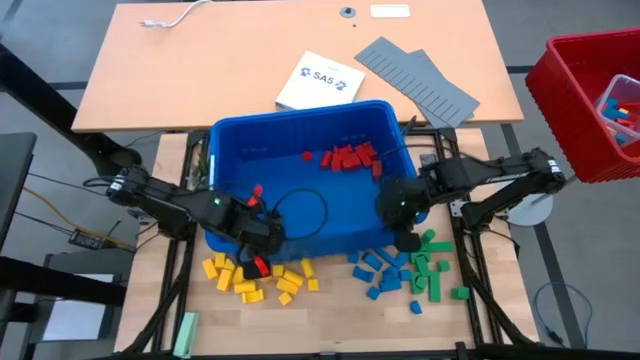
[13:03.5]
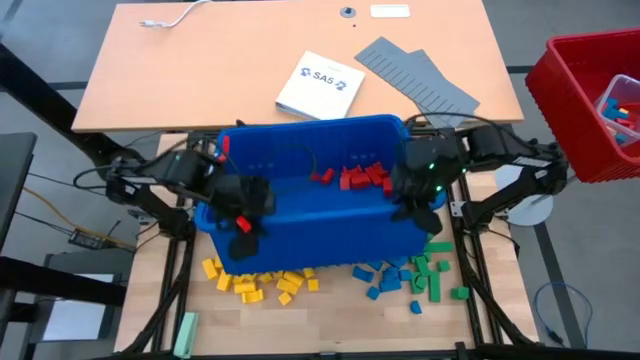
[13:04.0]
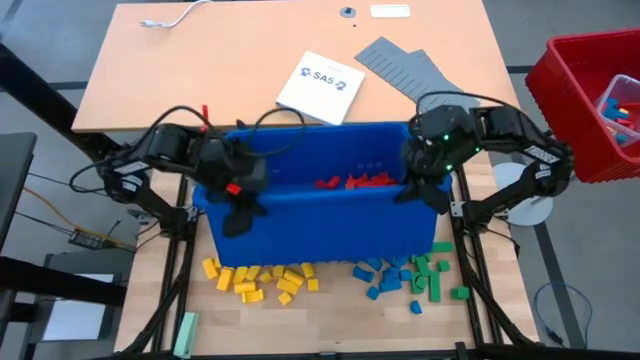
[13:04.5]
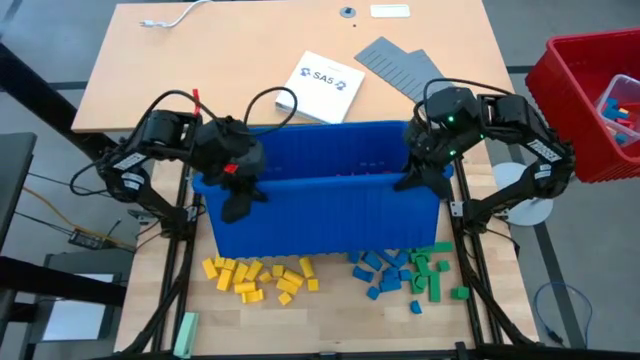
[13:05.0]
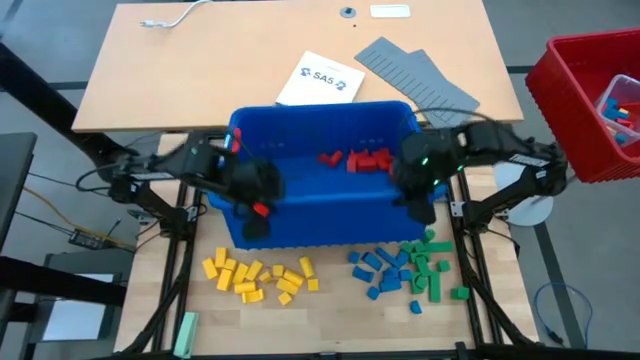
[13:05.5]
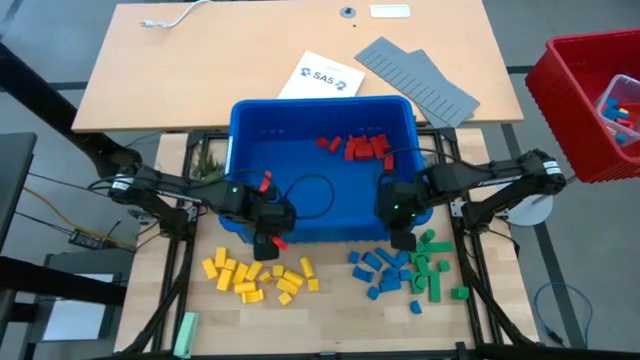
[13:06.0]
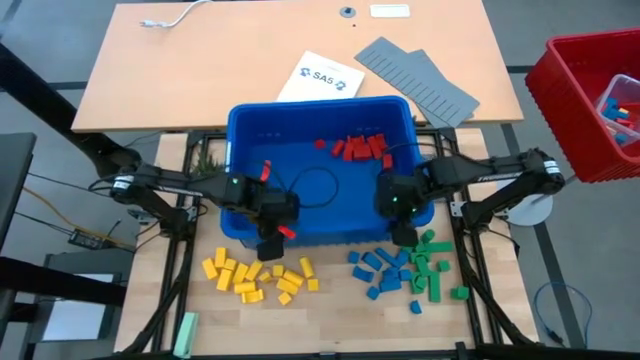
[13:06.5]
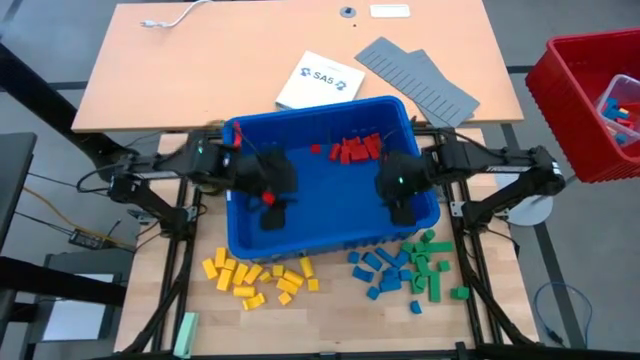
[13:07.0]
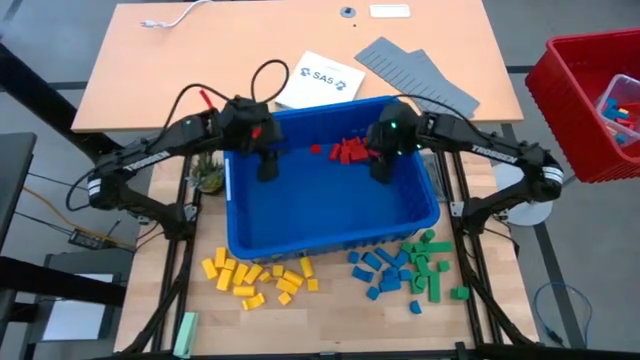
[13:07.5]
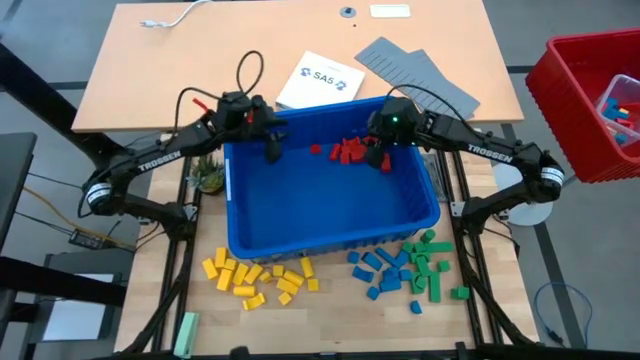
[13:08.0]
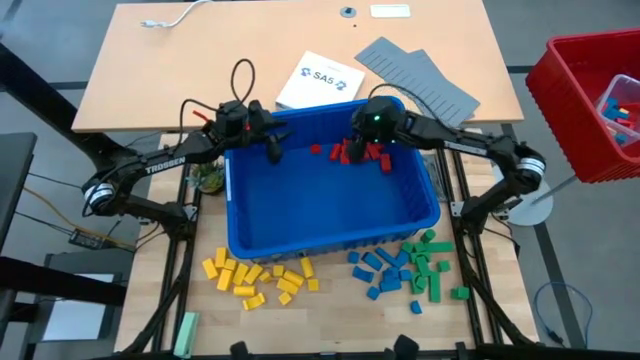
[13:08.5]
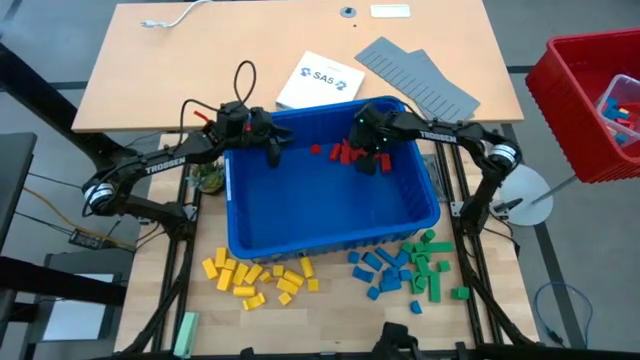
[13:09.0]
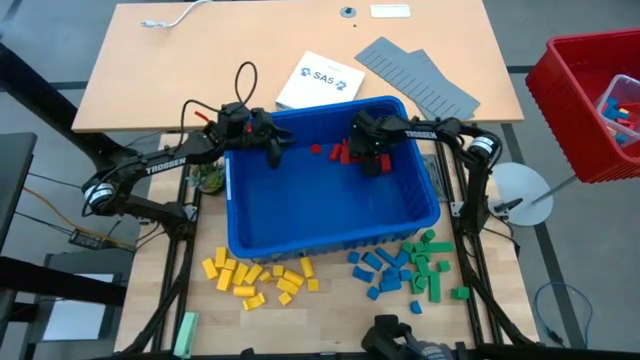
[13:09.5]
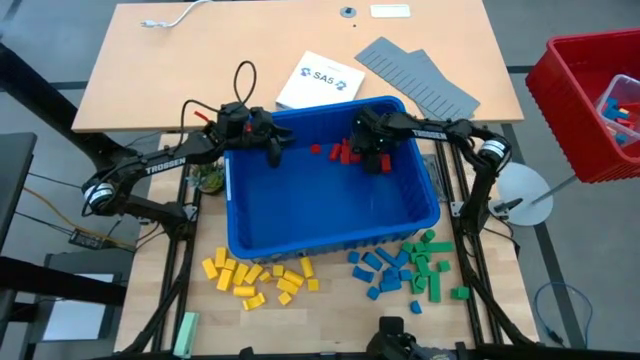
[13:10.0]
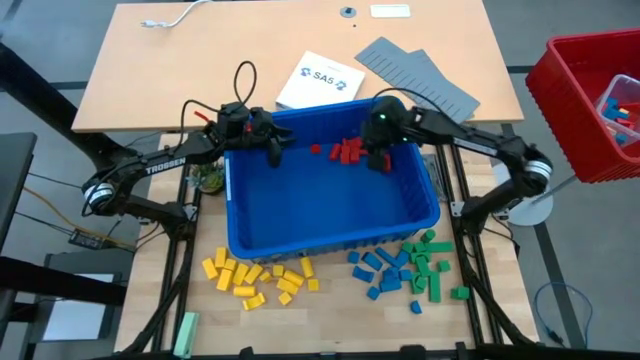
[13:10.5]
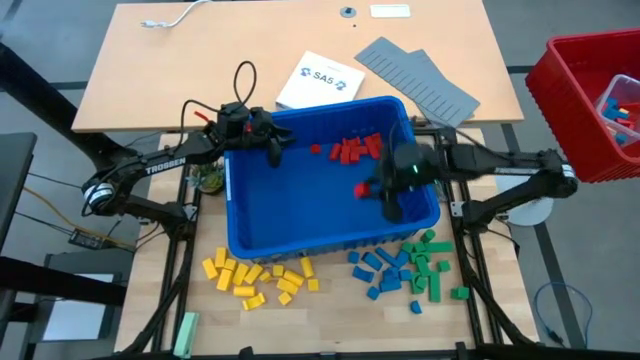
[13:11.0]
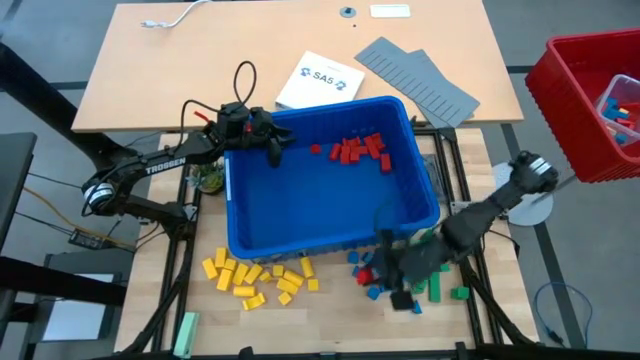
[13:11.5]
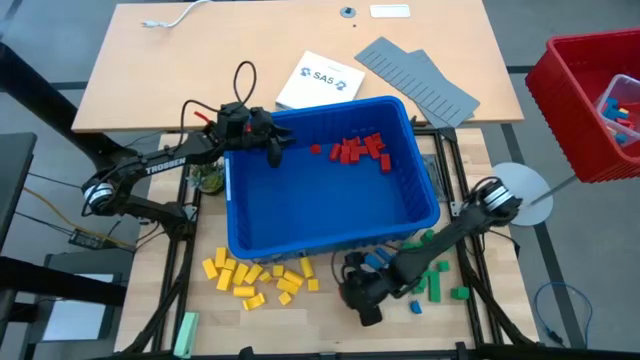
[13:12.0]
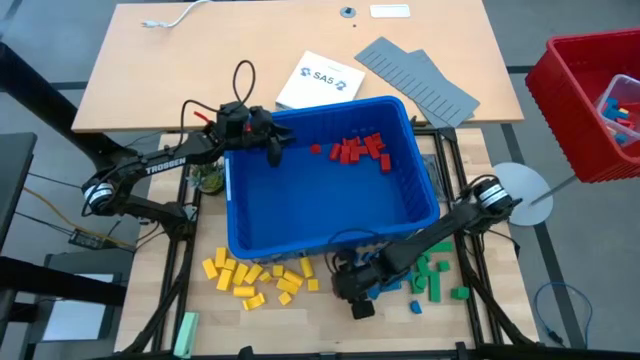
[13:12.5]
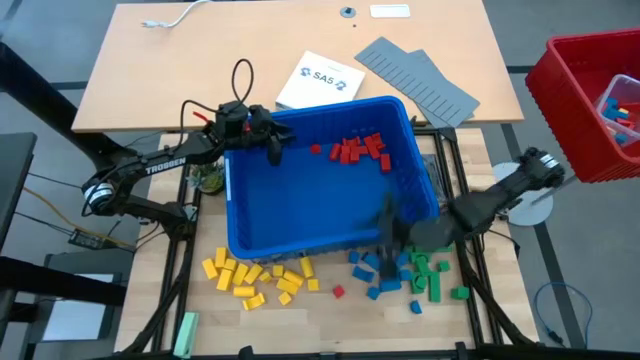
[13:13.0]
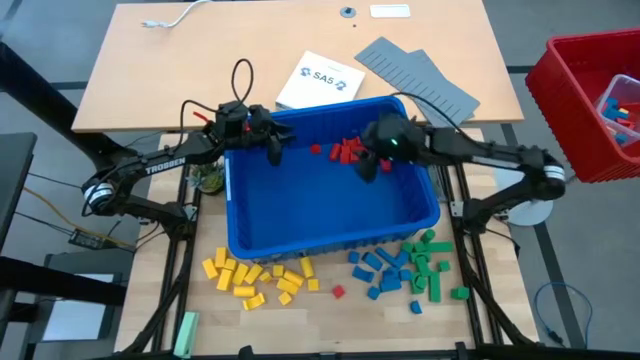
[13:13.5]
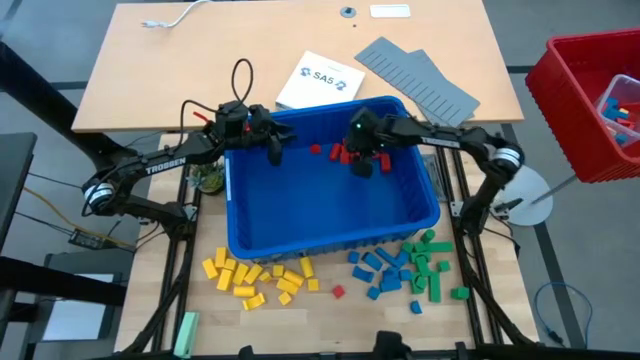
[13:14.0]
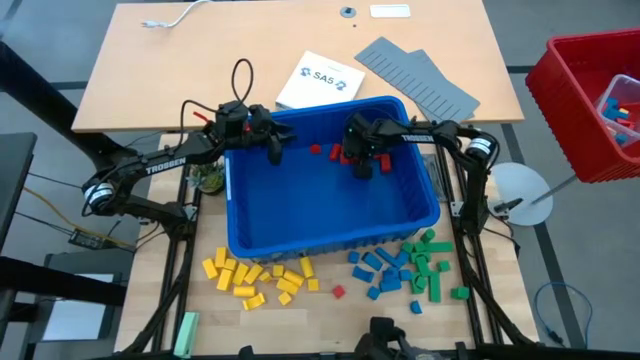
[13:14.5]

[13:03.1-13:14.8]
Task: Sort blocks
Remove the red block from the blue bin

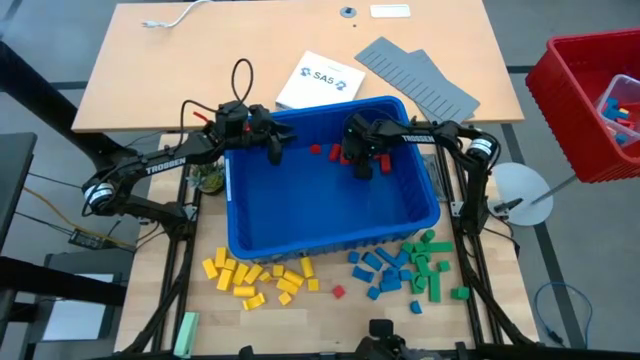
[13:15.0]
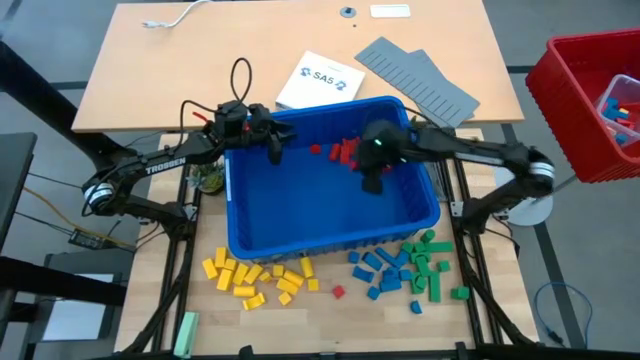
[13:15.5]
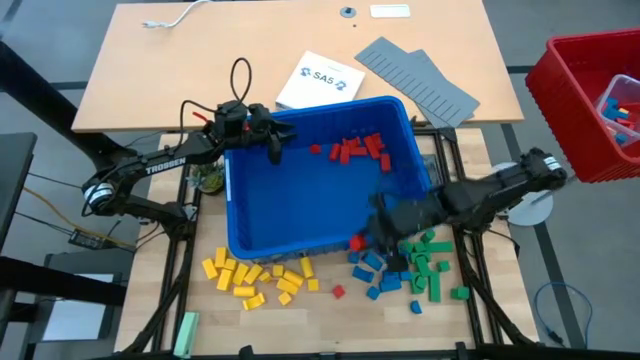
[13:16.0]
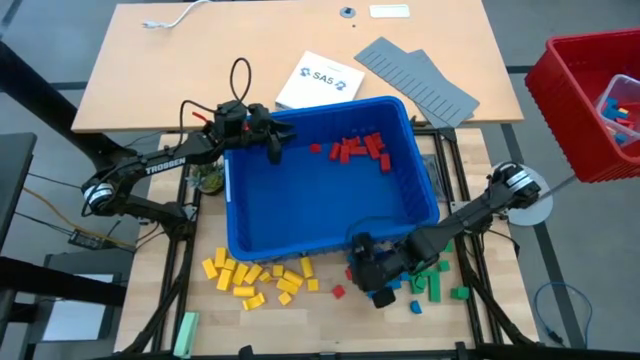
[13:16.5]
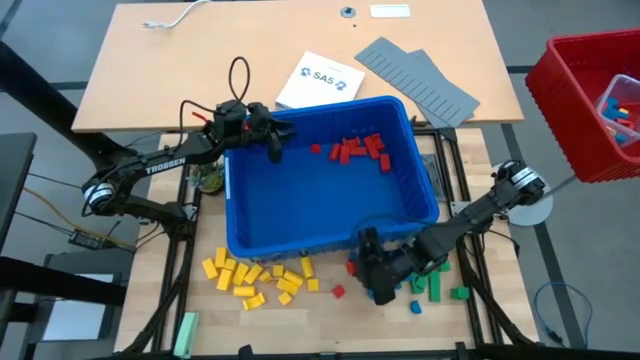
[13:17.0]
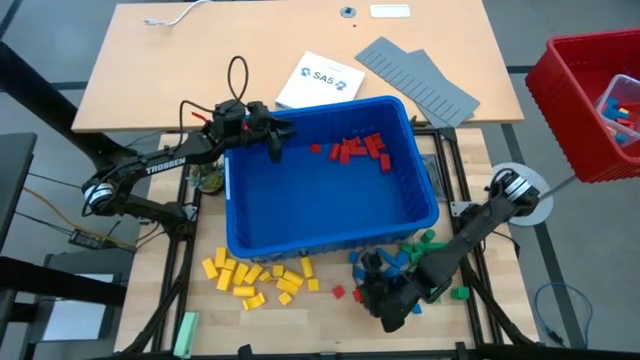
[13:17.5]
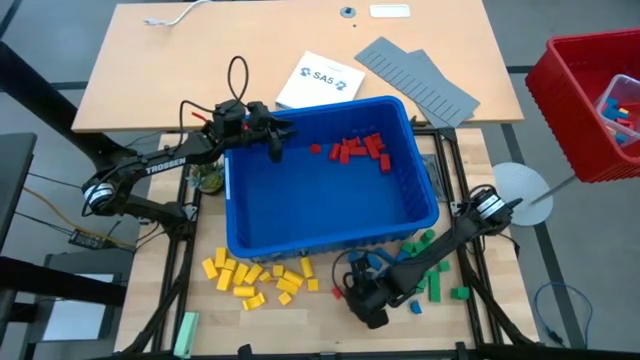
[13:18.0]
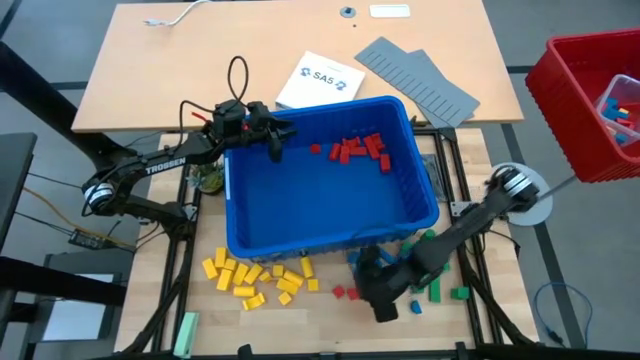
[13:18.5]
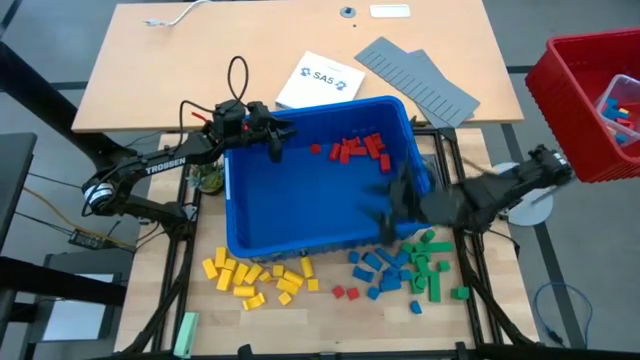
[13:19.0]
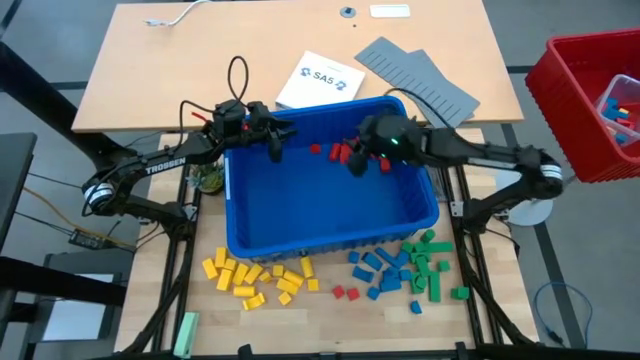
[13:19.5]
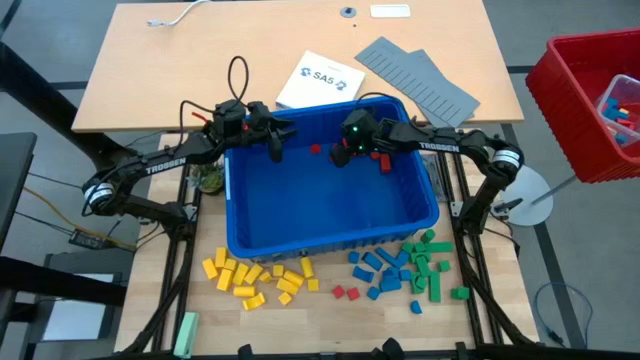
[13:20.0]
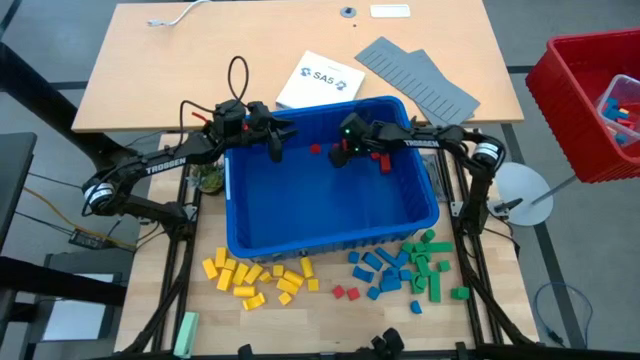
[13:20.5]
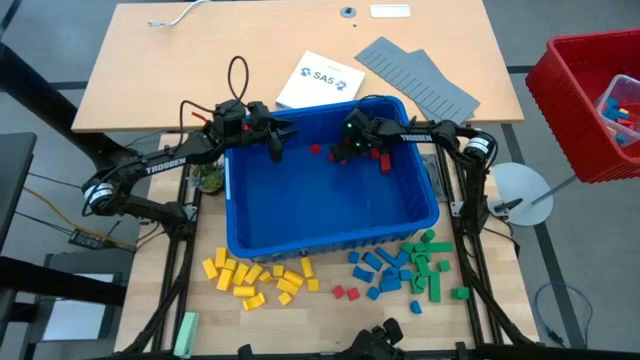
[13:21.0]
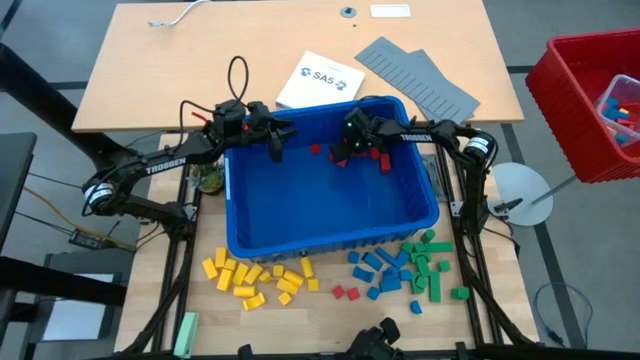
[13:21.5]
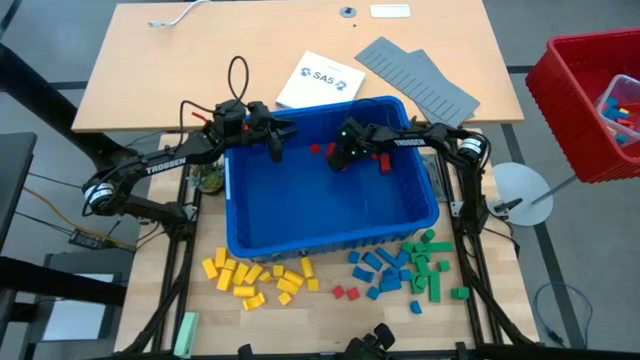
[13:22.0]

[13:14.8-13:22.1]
Remove the red block from the blue bin
